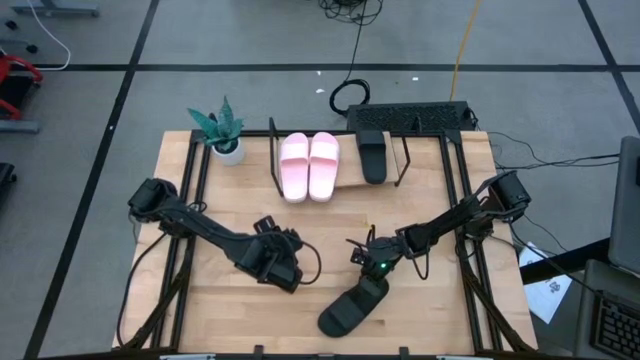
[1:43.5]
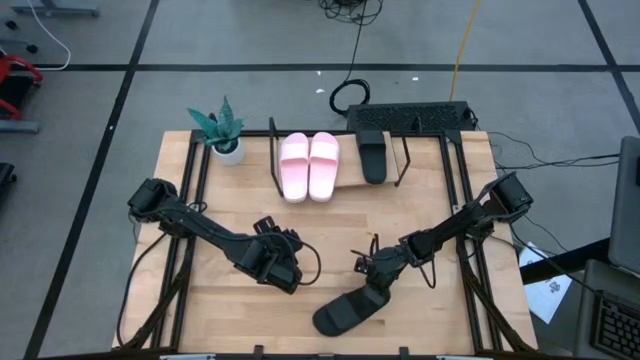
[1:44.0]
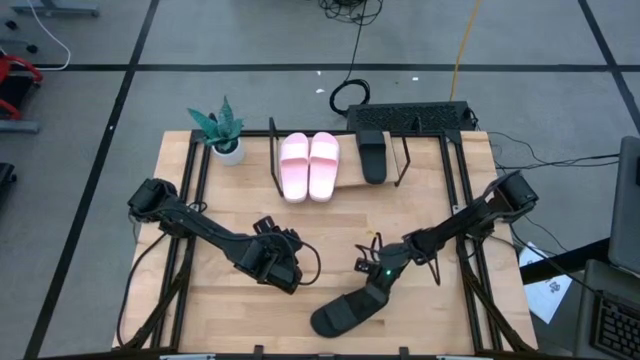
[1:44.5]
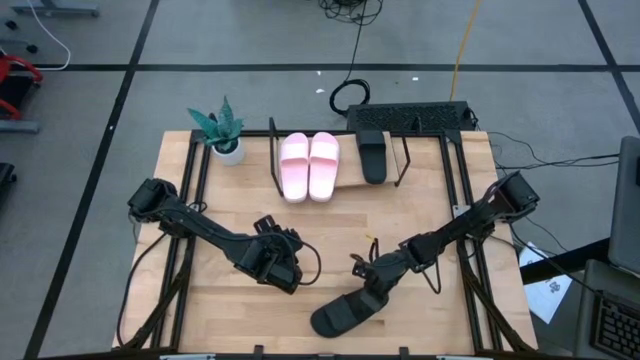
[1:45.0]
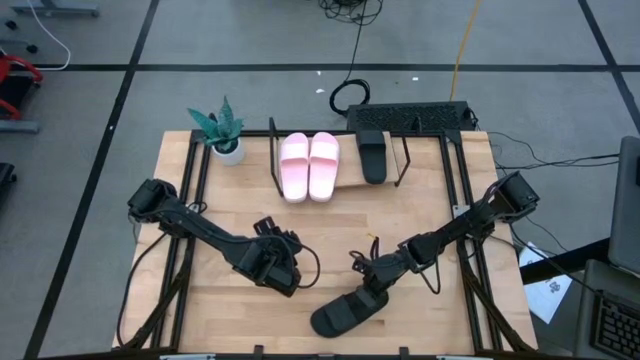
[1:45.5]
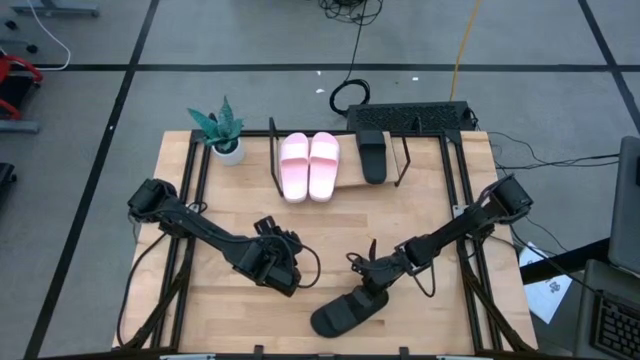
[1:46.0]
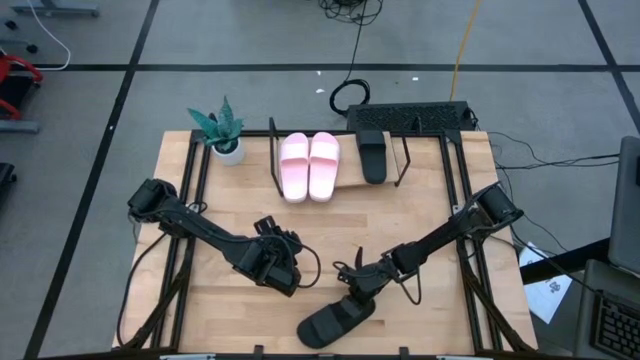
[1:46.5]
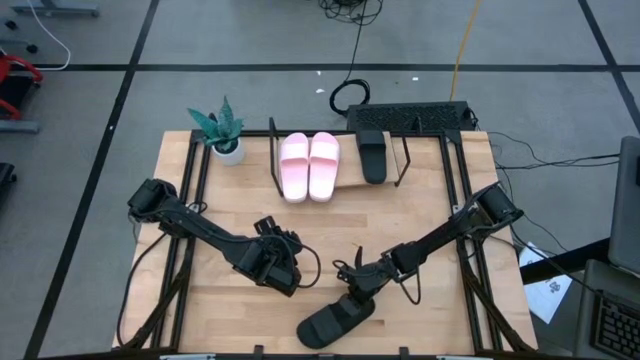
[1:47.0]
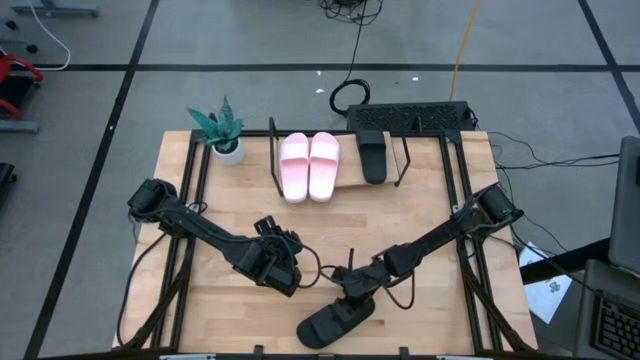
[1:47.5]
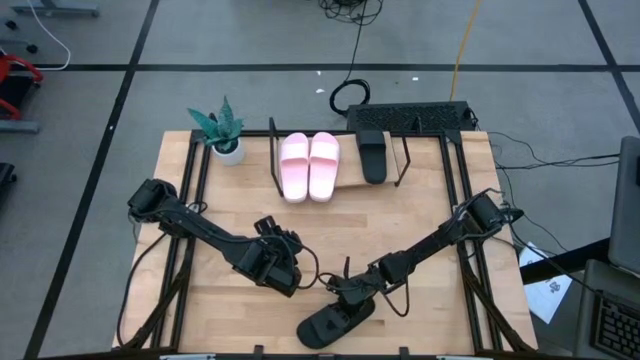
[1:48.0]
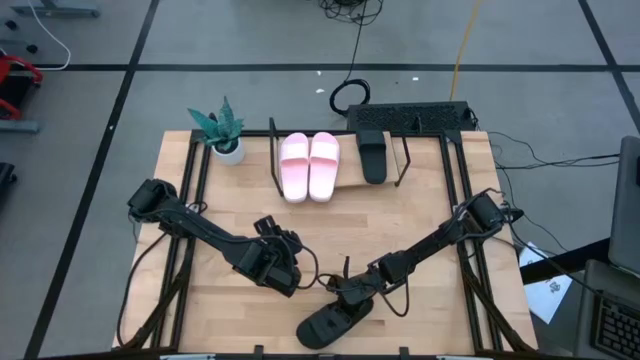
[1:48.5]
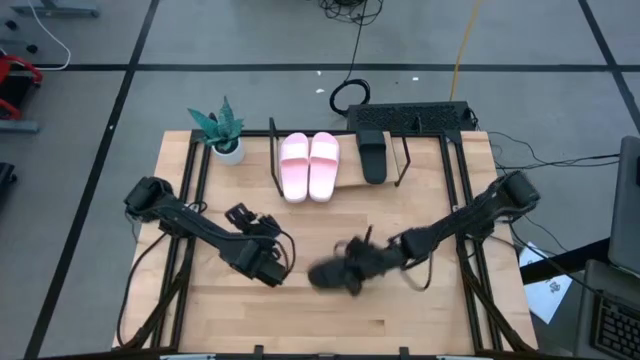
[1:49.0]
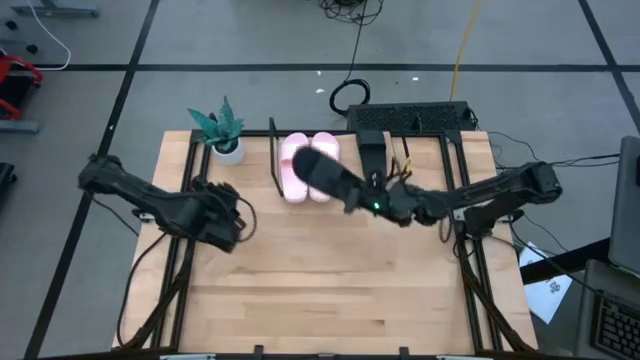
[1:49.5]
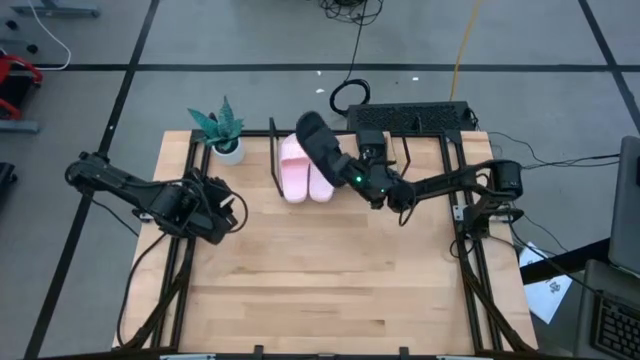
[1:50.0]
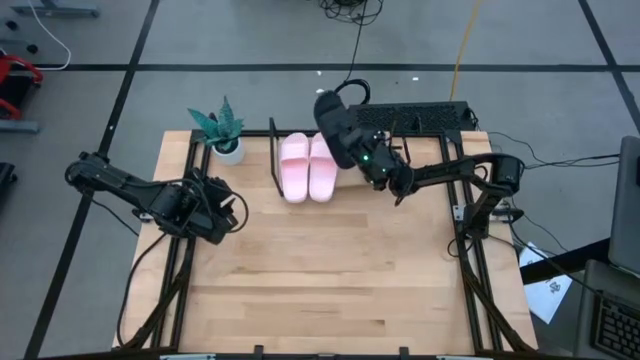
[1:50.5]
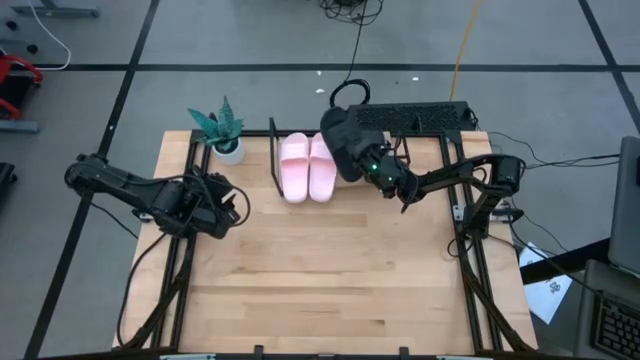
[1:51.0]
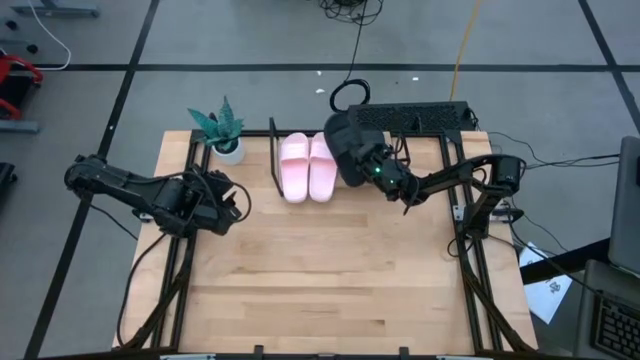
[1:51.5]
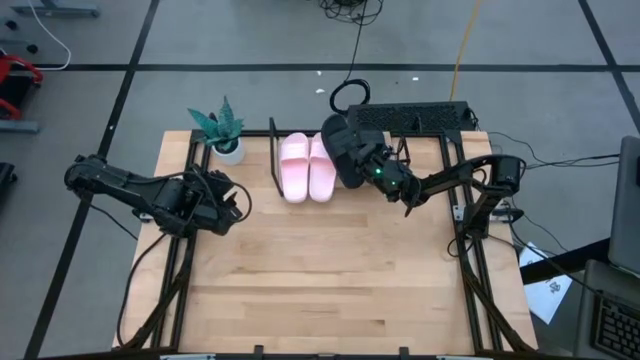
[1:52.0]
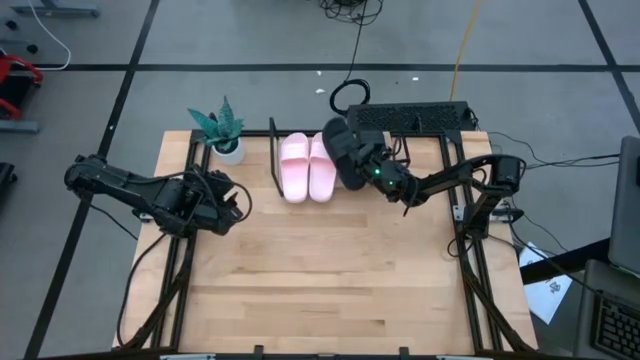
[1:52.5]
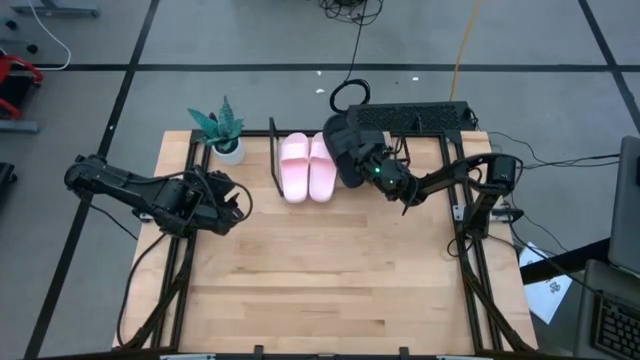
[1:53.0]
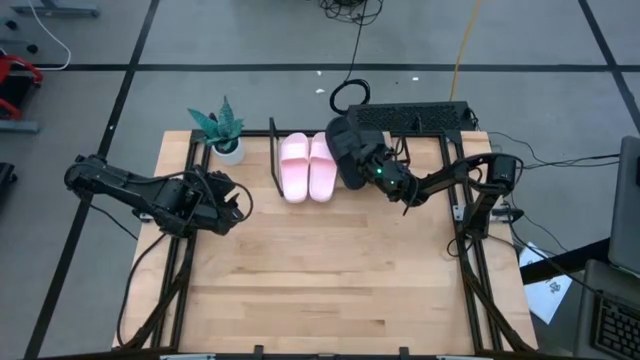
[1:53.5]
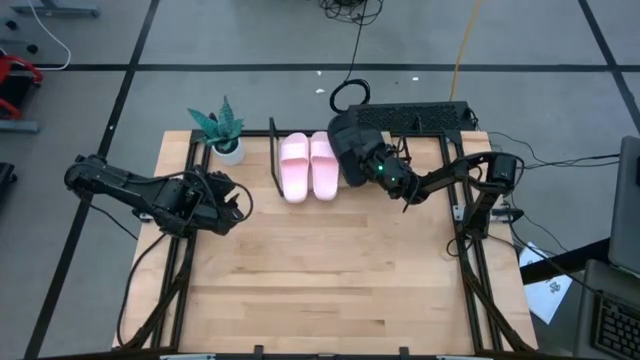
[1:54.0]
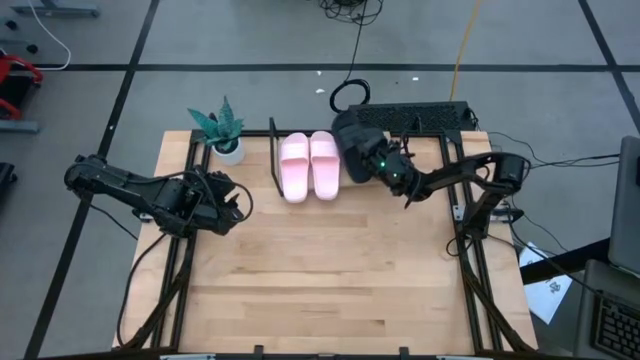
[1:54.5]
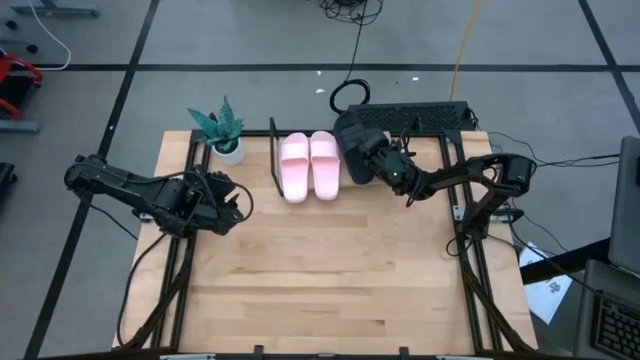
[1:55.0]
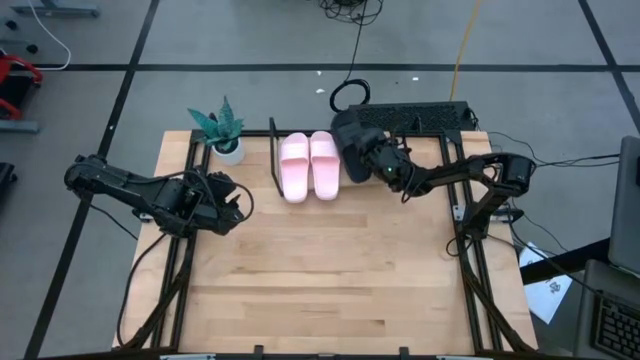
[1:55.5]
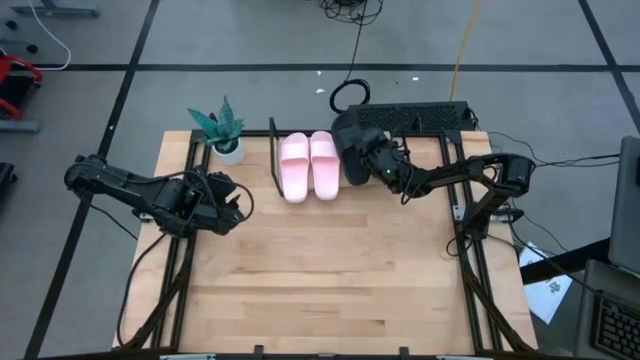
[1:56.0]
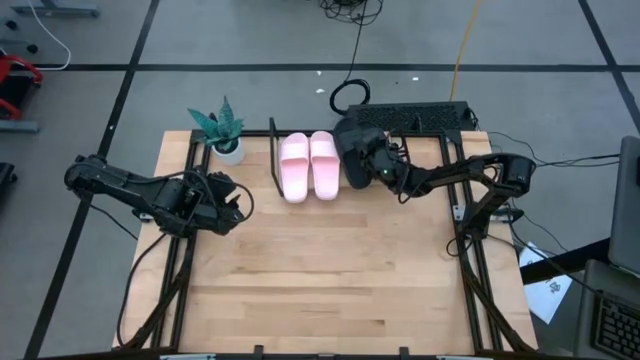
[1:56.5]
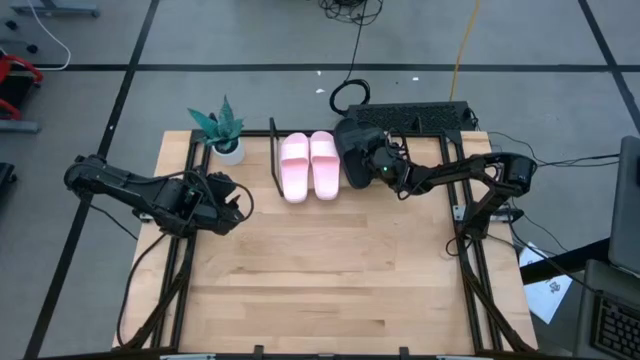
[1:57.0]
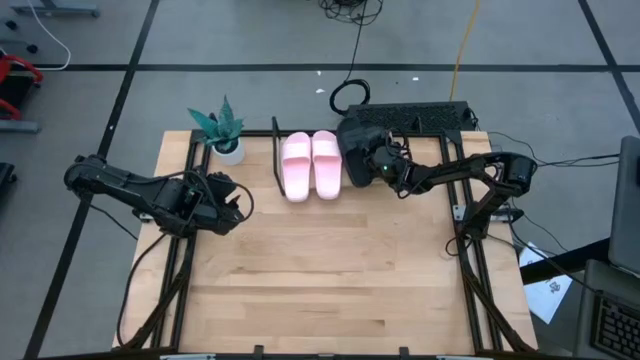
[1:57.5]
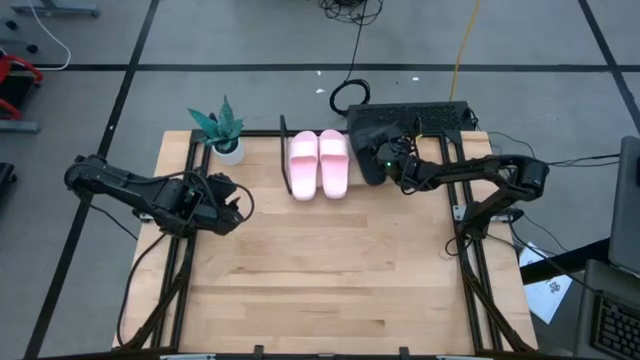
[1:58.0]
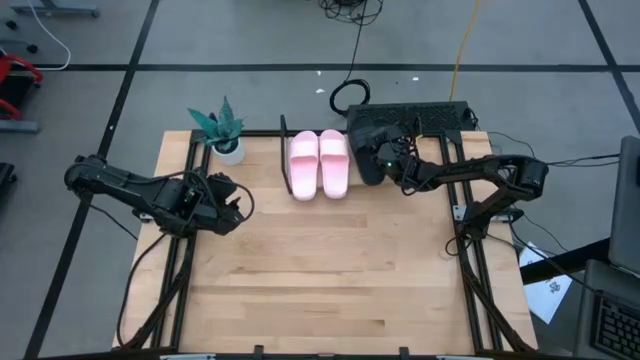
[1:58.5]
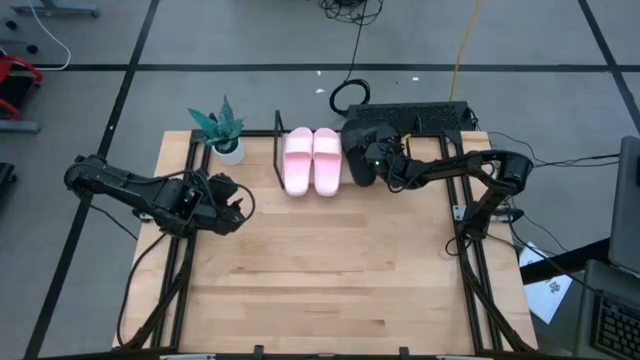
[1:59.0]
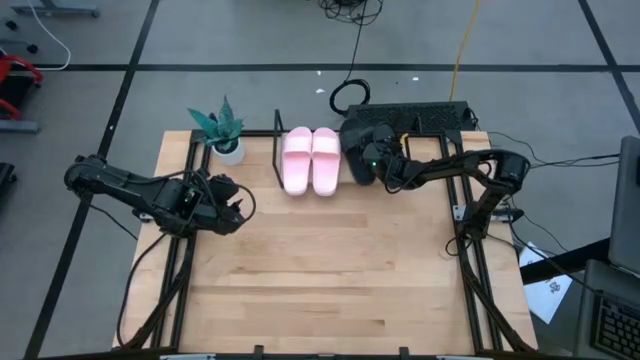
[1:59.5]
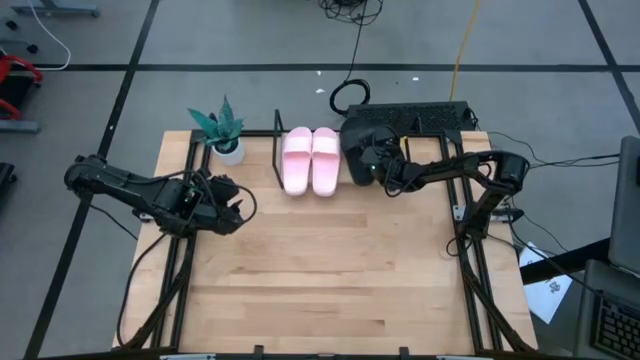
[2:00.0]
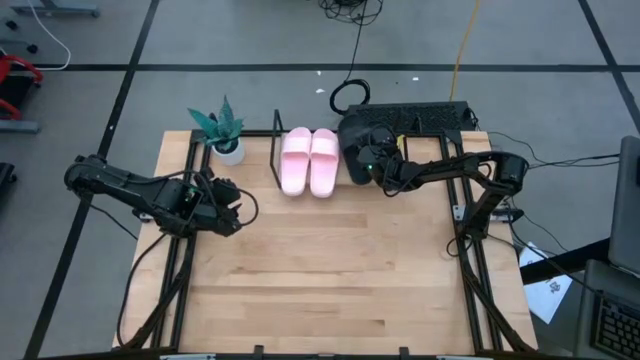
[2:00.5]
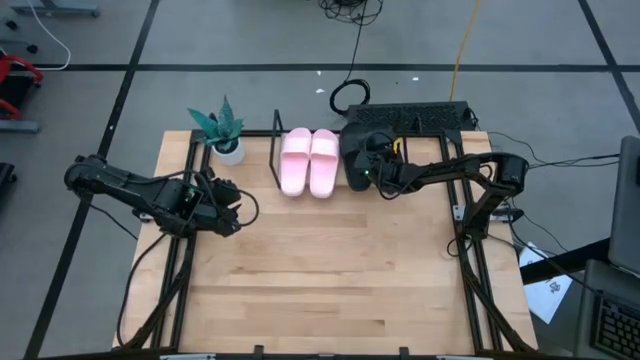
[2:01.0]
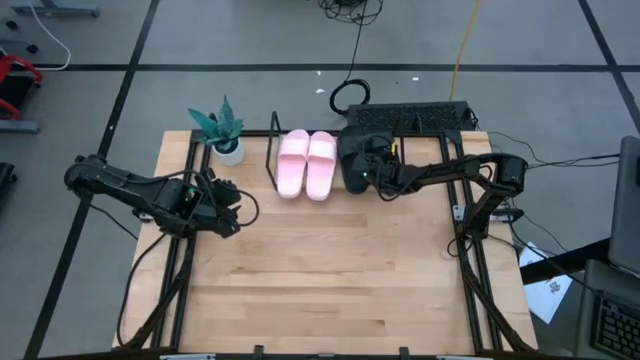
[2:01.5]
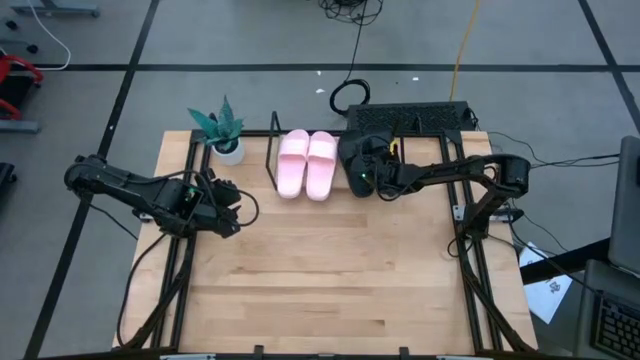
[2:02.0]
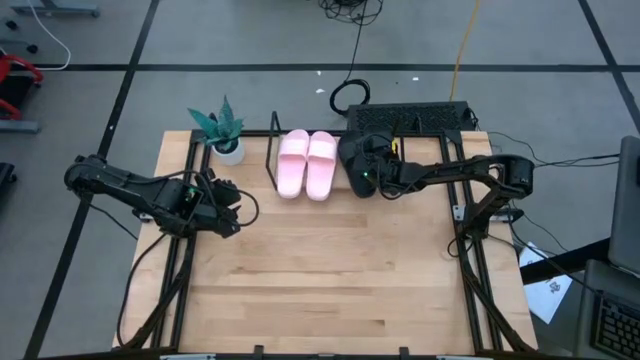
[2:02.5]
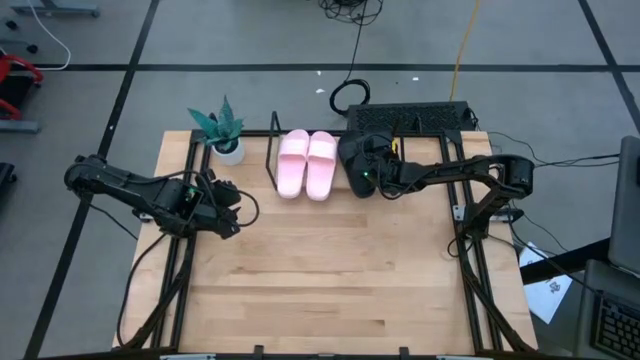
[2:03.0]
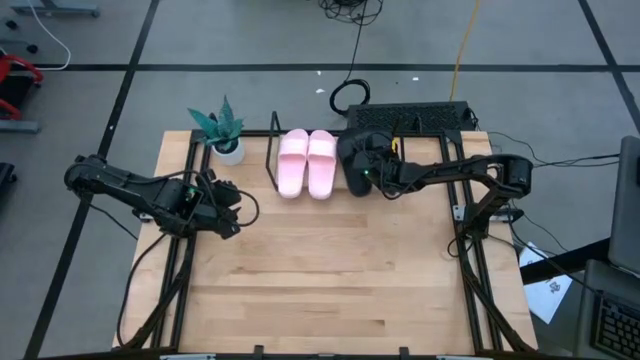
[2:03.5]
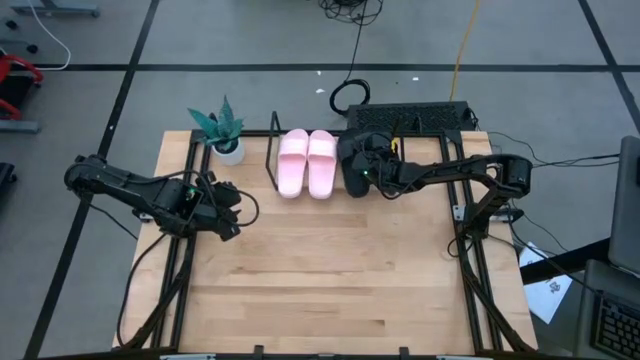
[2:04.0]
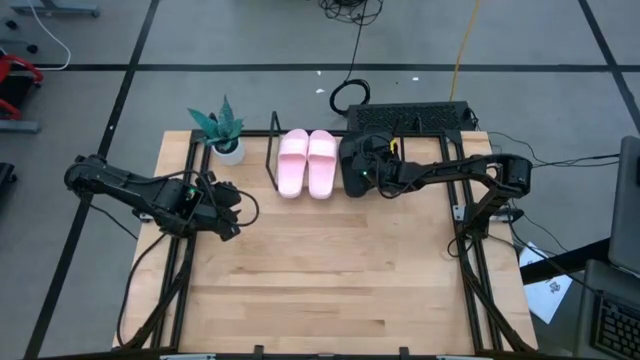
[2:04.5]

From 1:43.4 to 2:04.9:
Task: Pick and place slides into the shelf
Put the black slide on the shelf
